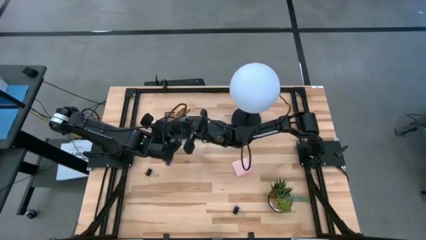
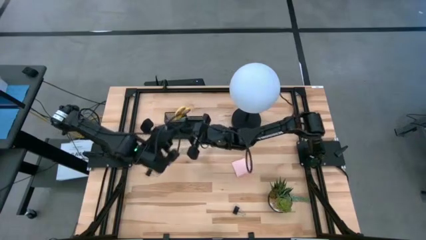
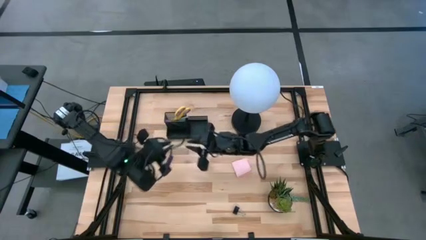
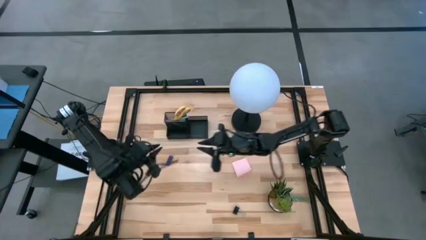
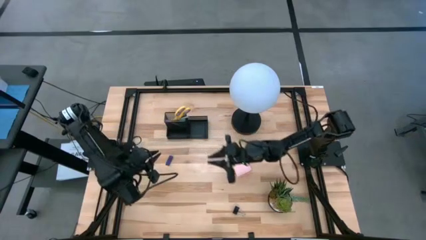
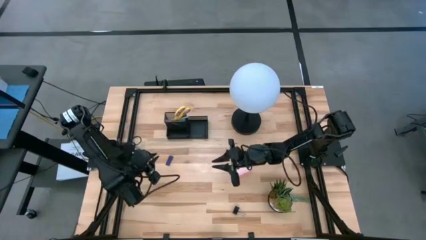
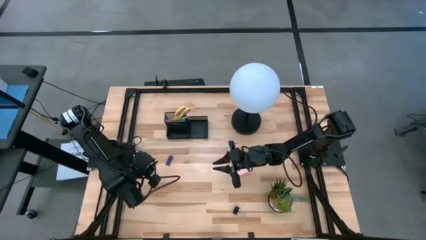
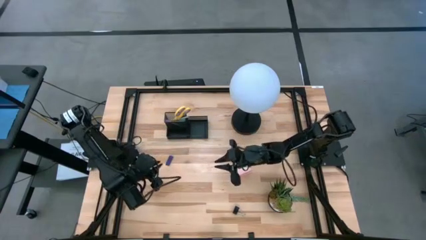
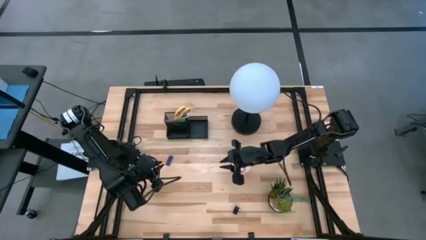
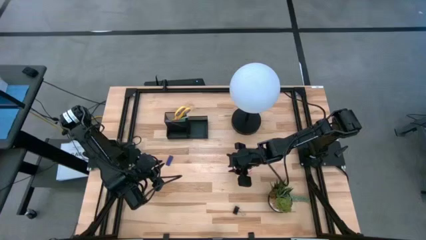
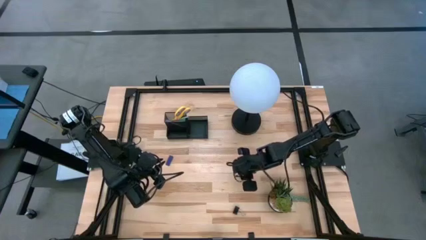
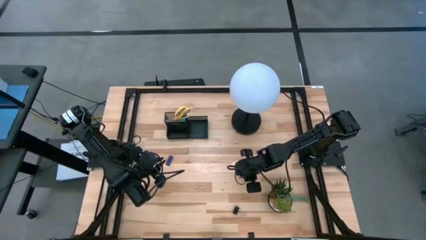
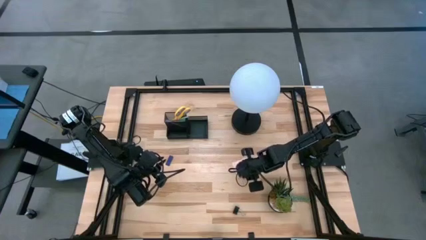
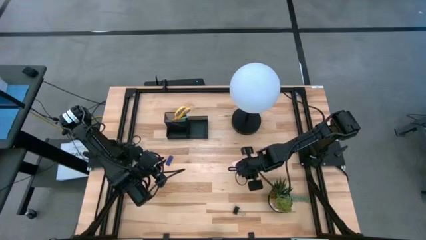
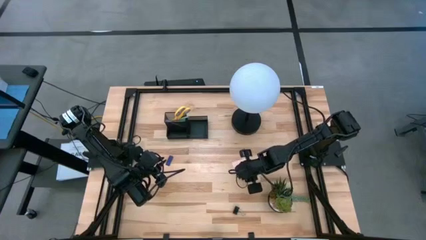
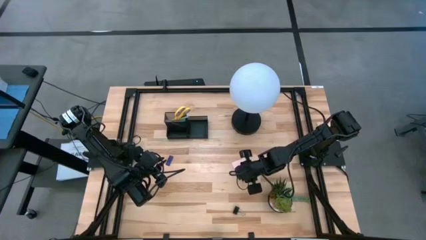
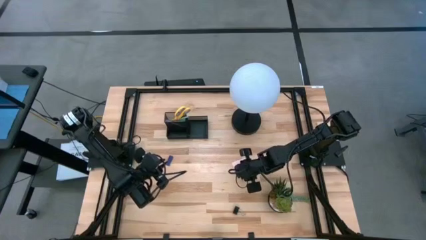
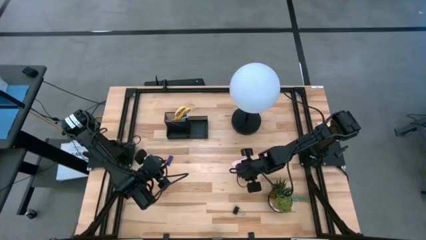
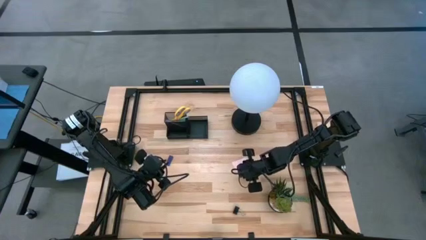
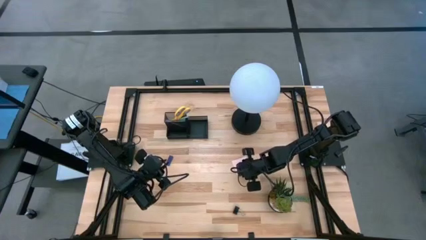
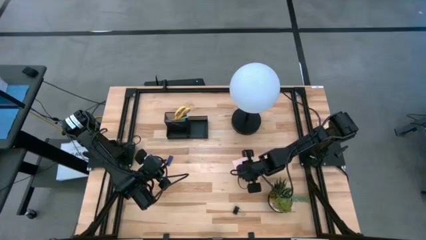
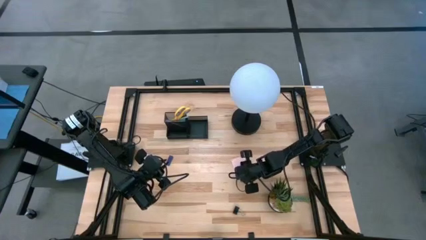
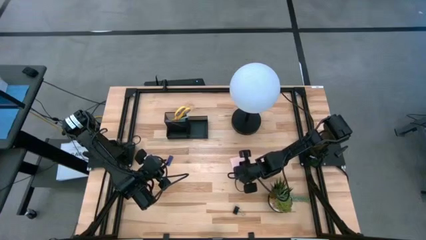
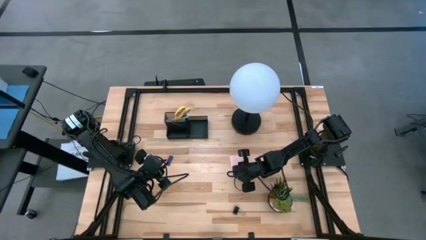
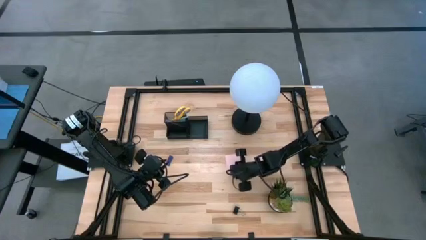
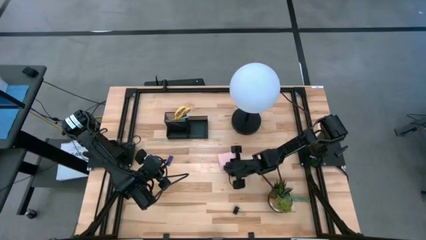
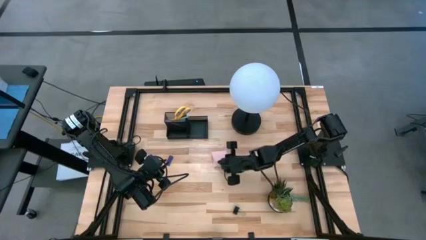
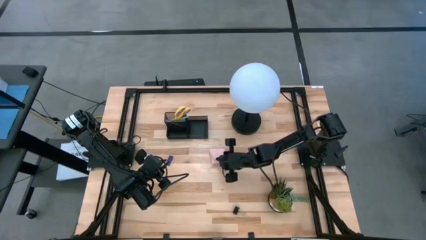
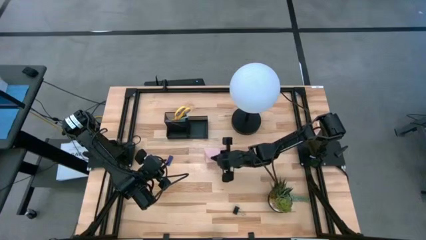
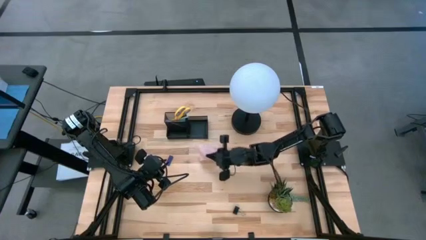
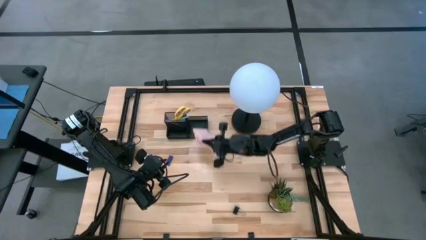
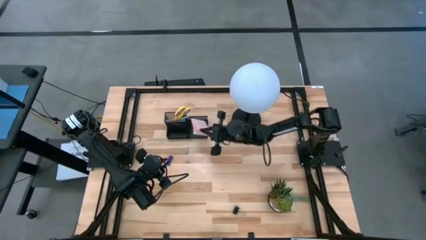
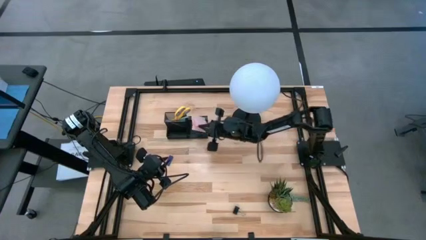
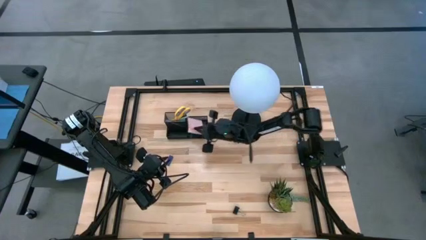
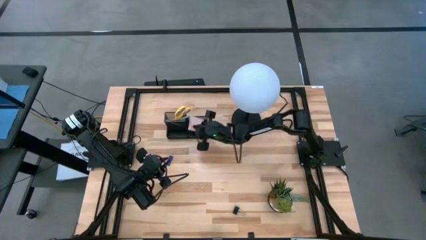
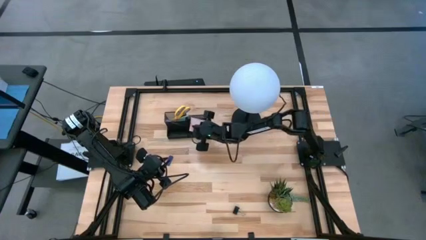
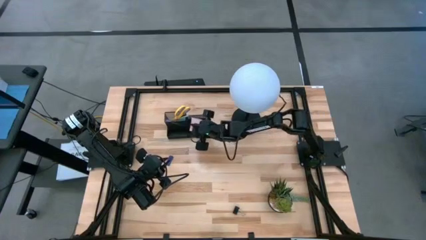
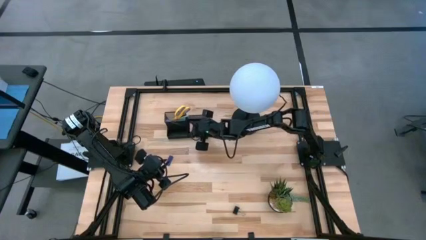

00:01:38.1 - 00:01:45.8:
Task: Pick and place office supplies into organizer
Put the pink sticky note pad into the black desk organizer

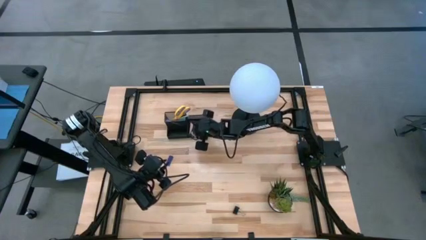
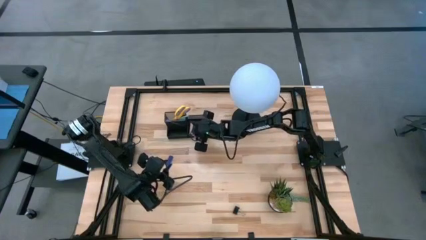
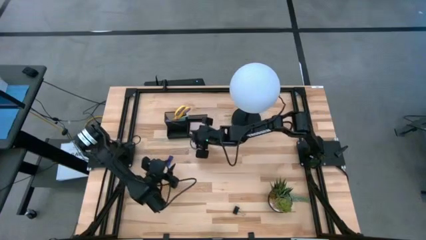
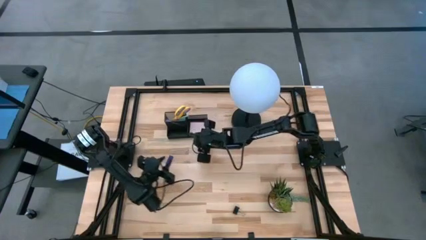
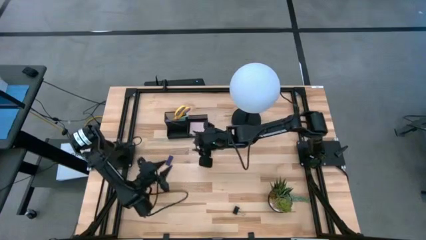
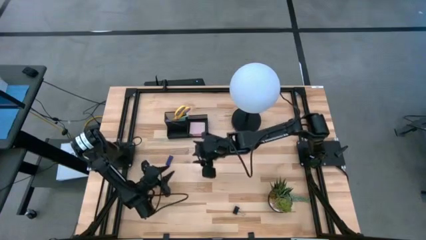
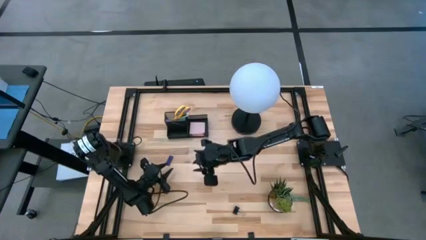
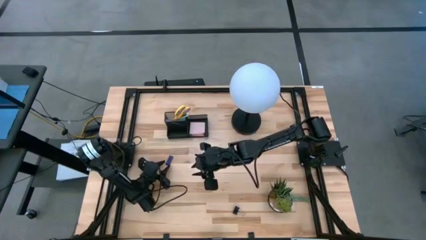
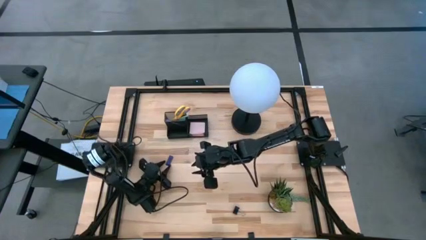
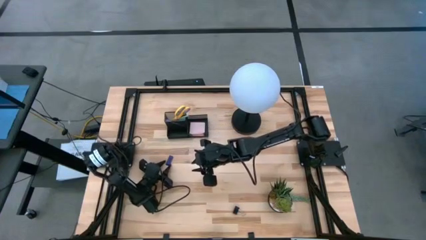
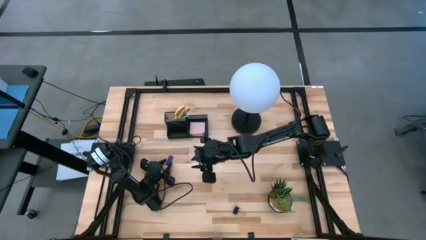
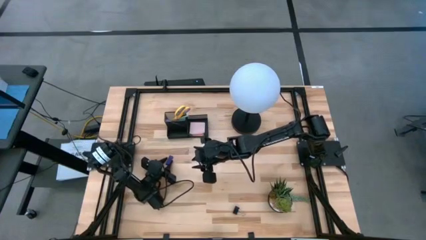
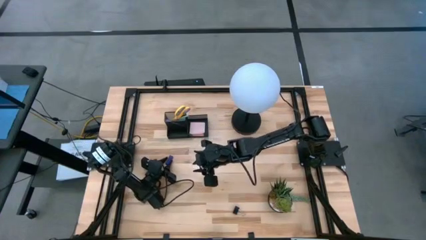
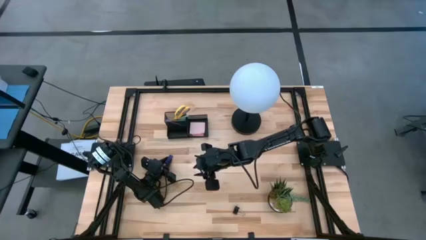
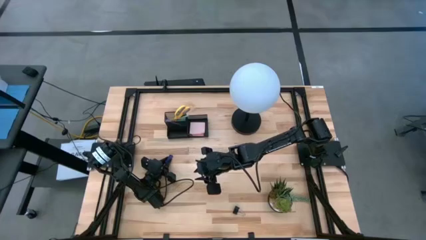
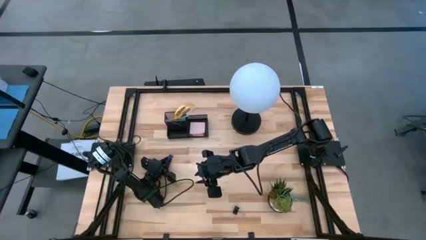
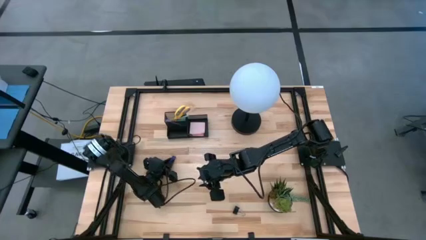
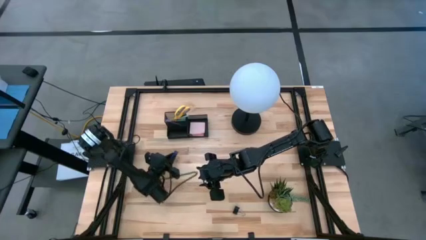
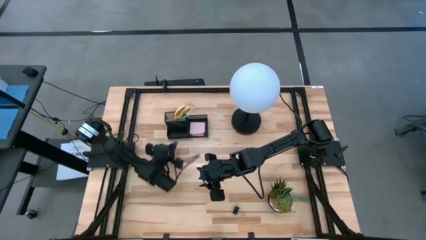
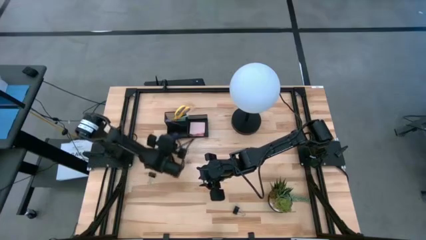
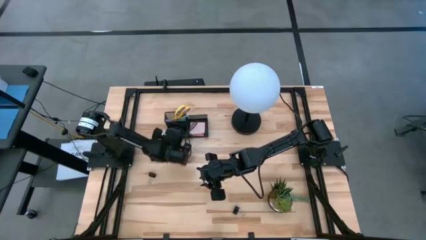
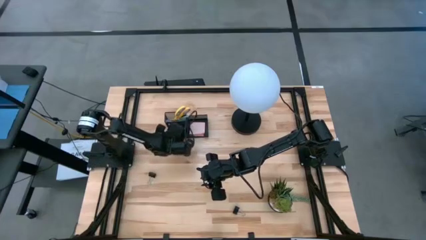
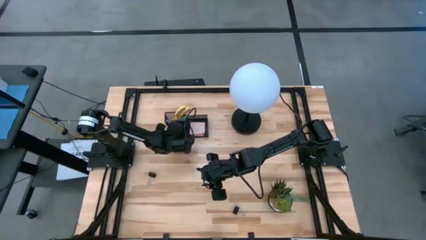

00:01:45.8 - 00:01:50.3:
Put the blue eraser into the black desk organizer

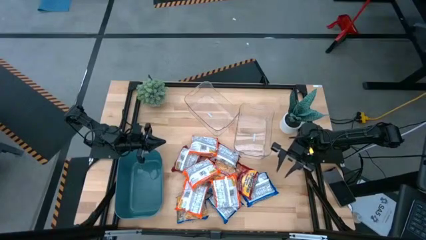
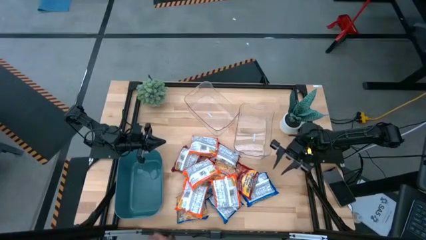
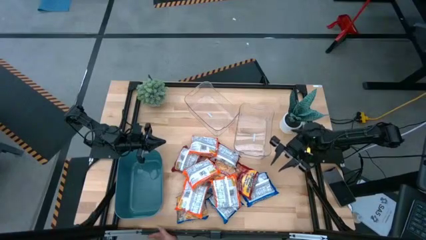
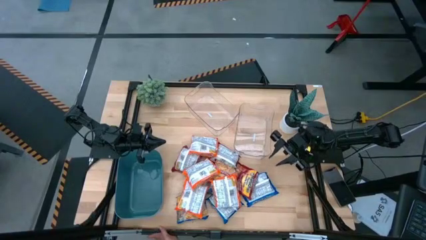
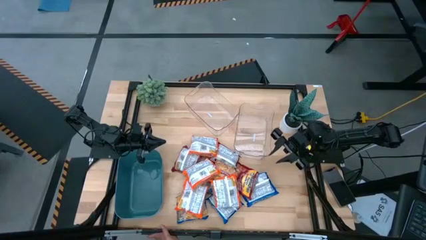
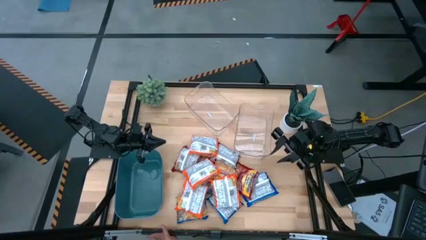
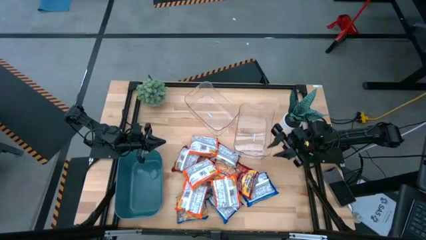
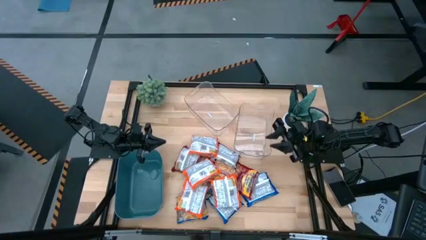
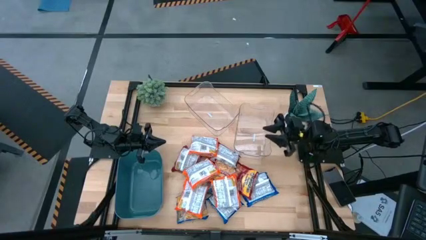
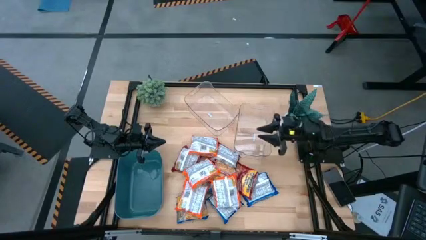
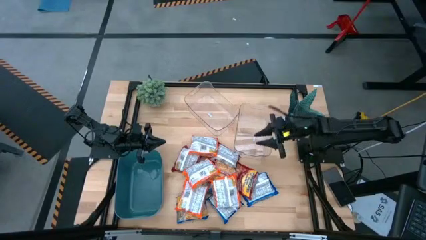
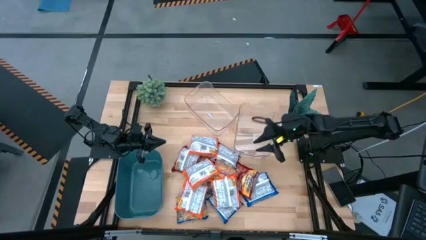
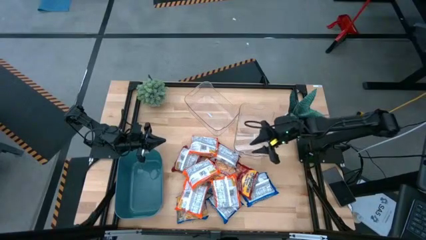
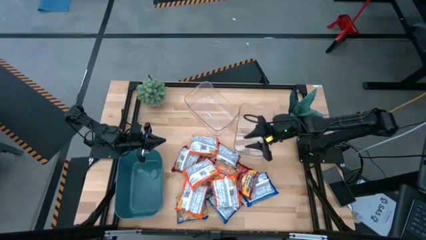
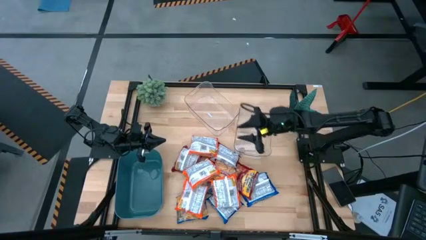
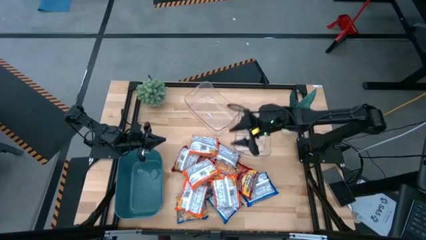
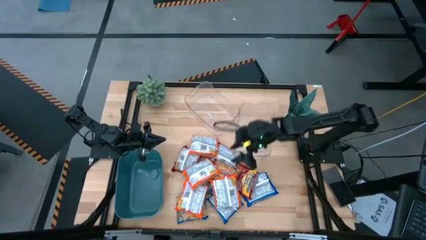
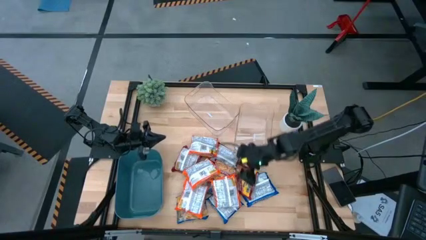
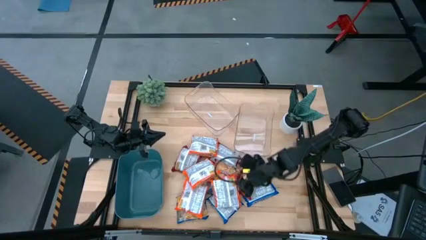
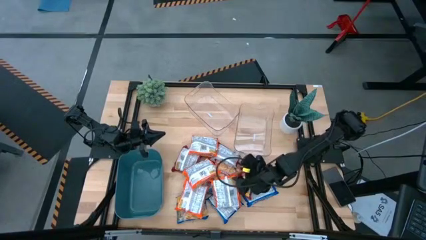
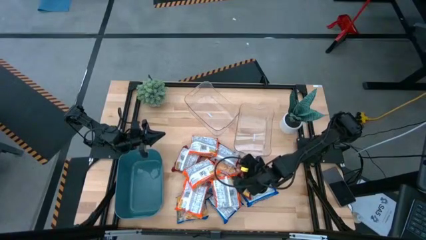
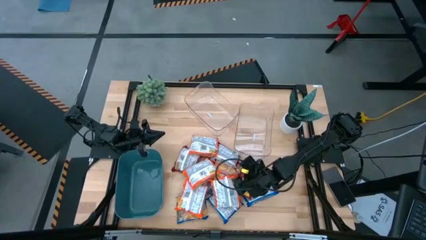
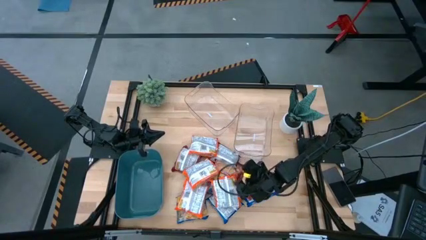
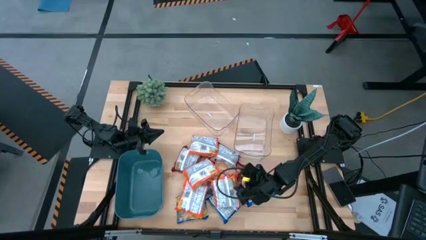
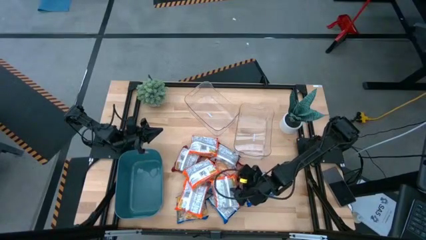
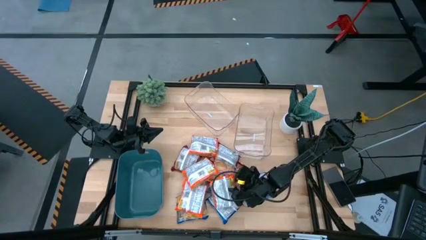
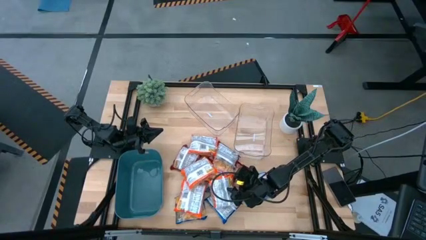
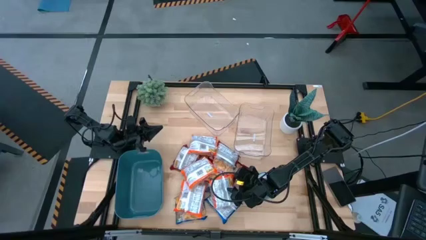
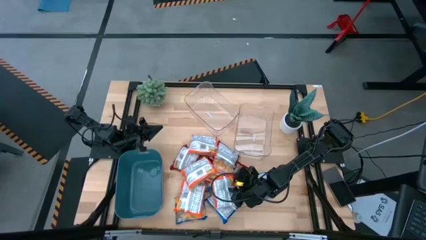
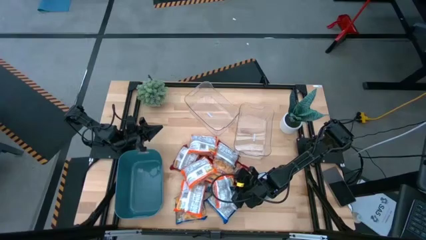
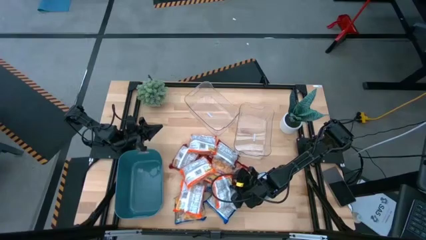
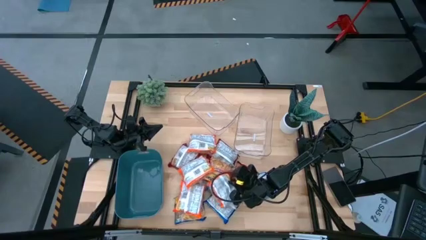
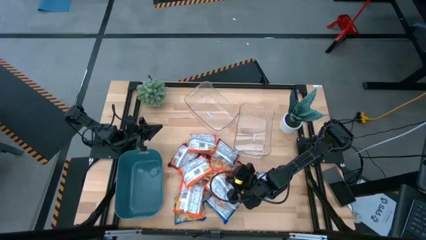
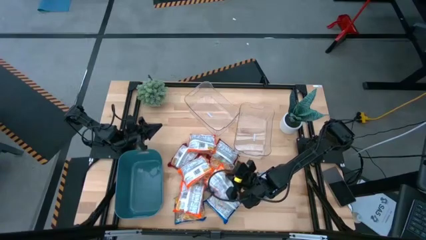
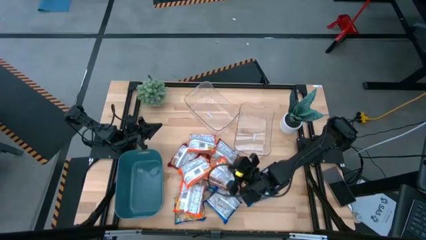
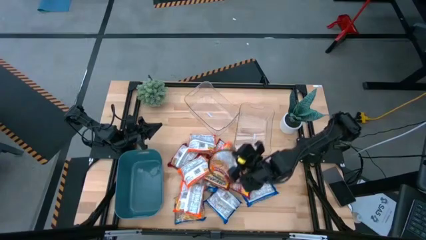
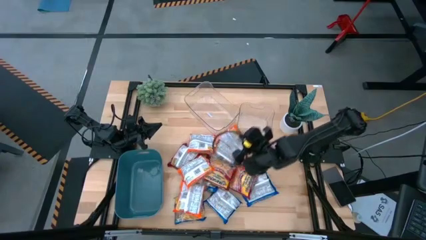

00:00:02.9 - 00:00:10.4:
Task: Sort Maruchan noodles
Put the orange noodle pack into the right transparent bin
